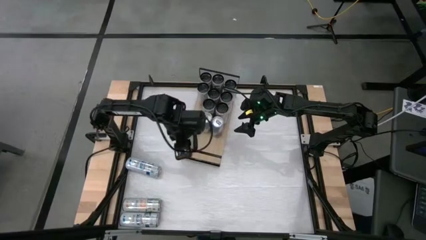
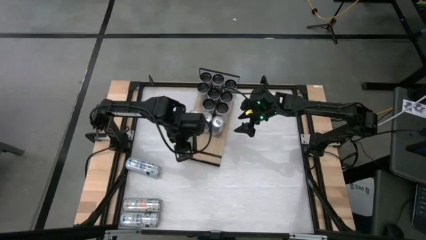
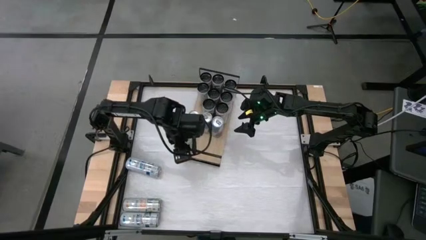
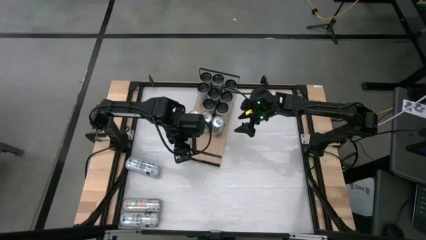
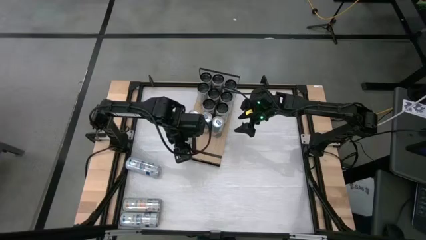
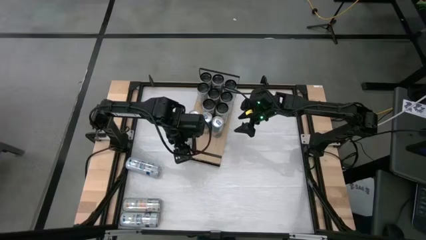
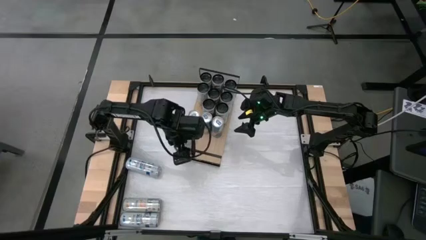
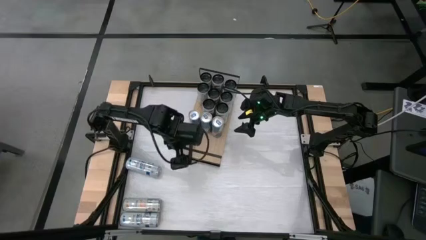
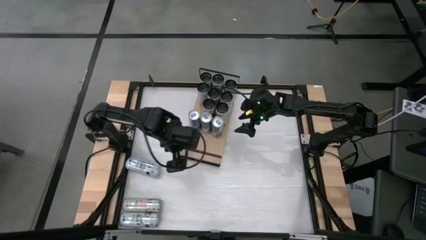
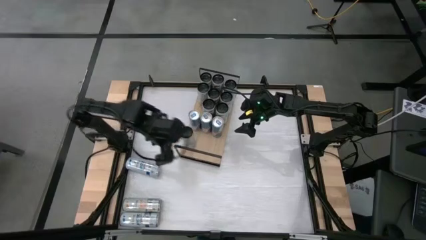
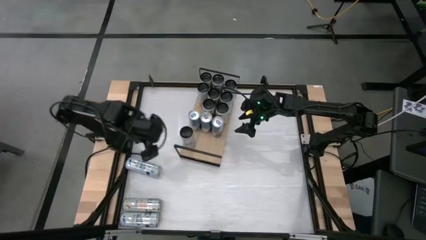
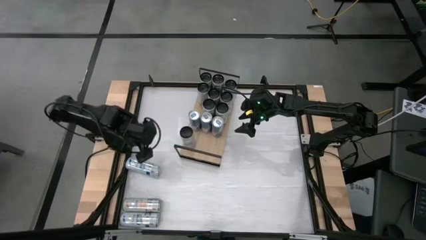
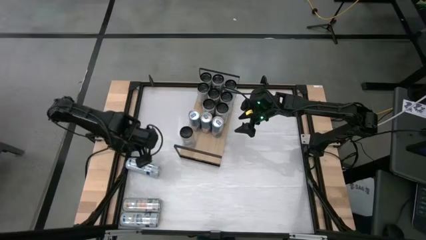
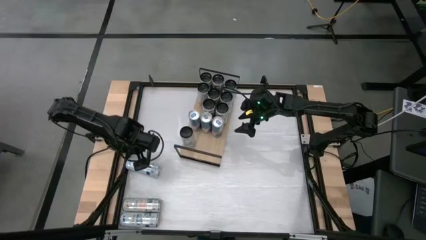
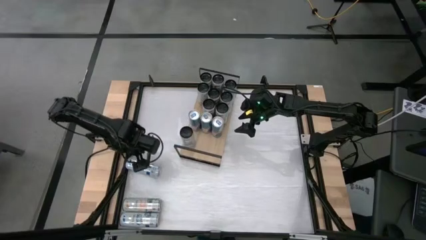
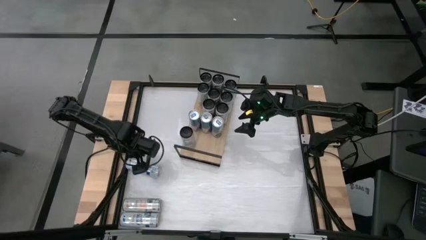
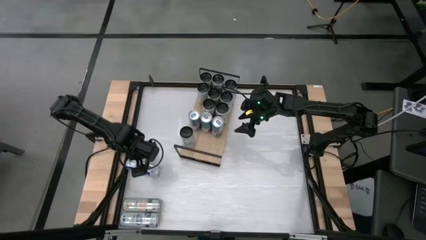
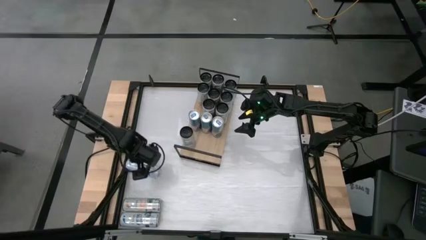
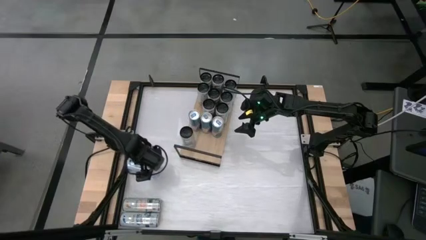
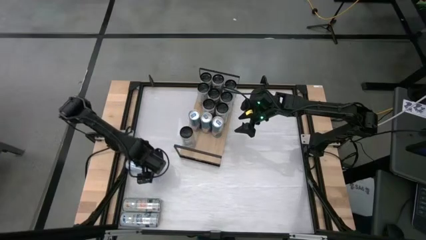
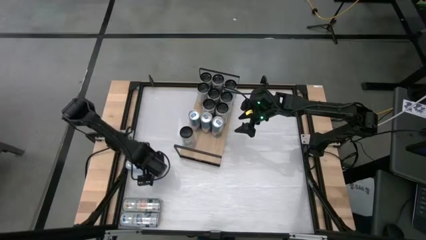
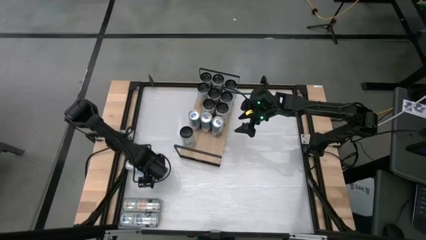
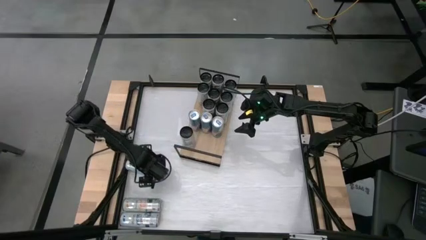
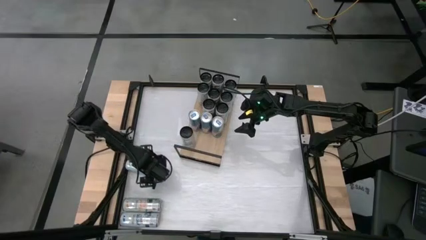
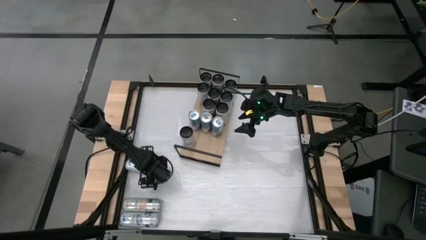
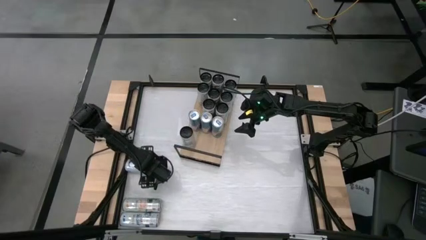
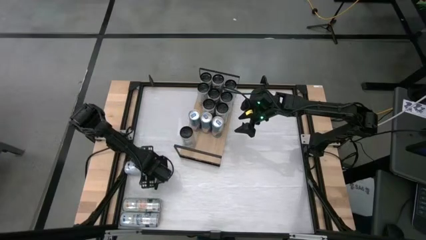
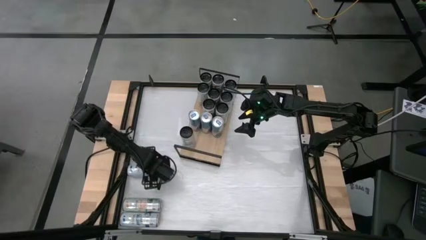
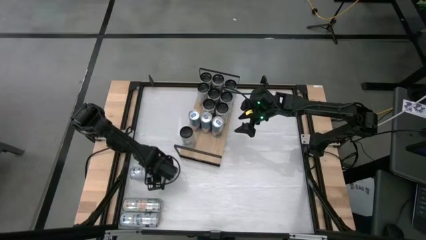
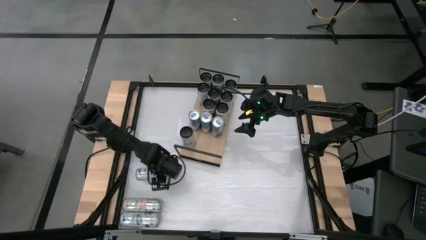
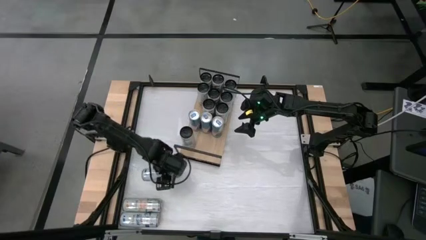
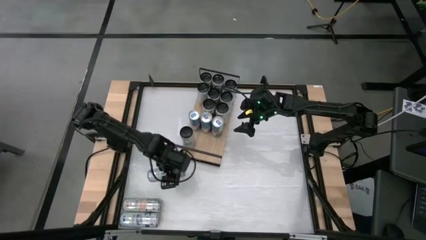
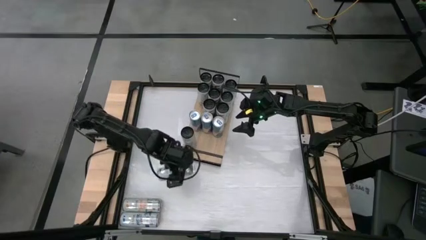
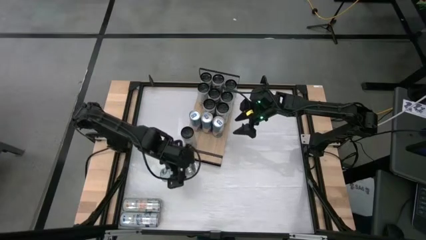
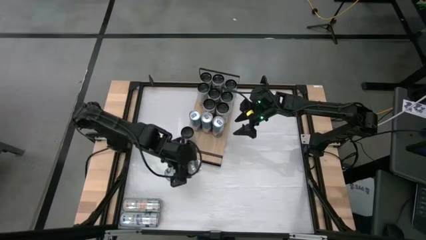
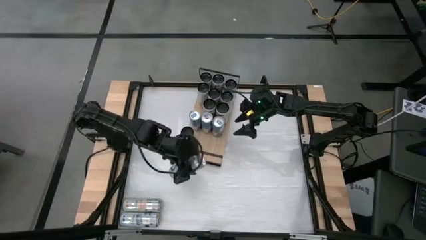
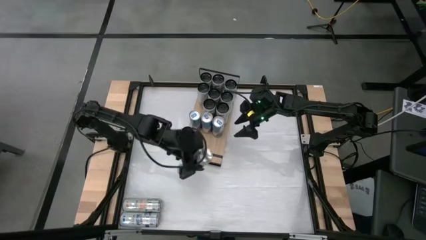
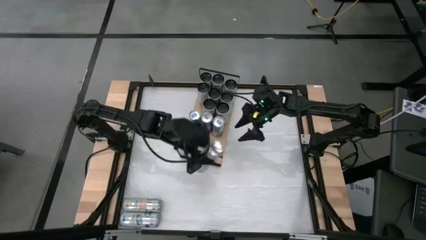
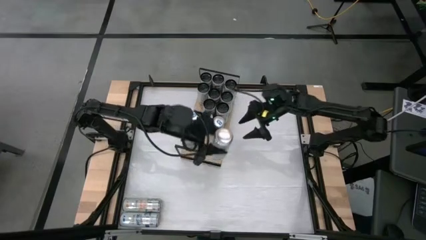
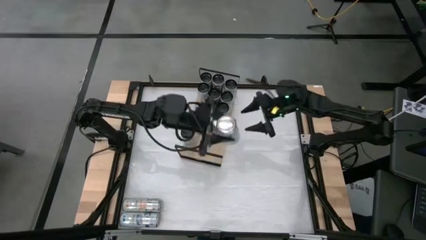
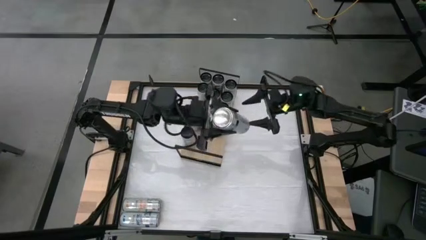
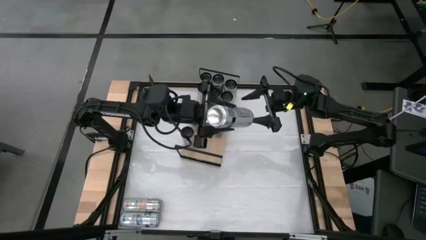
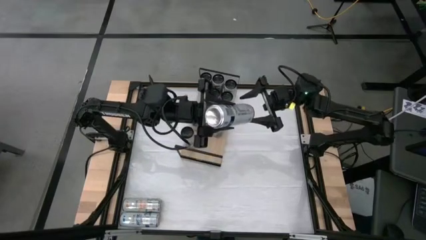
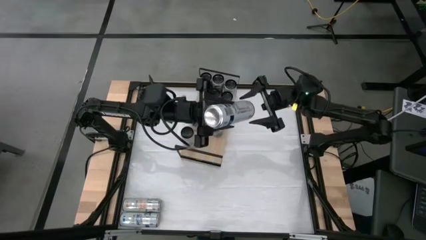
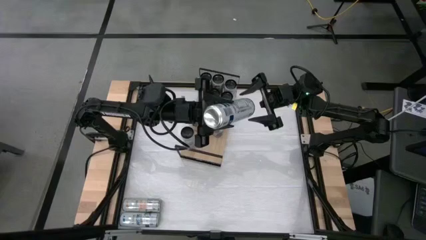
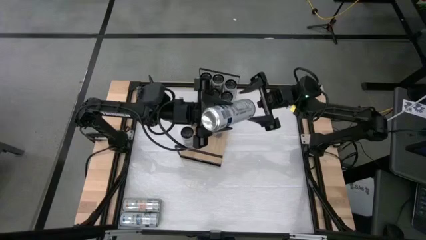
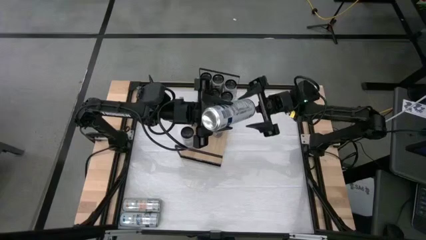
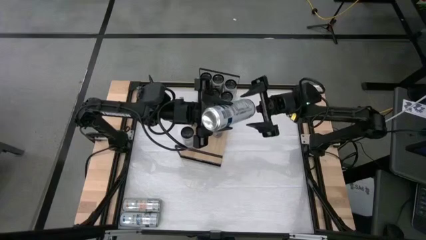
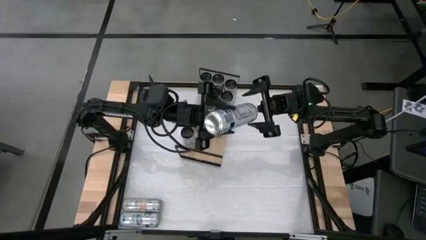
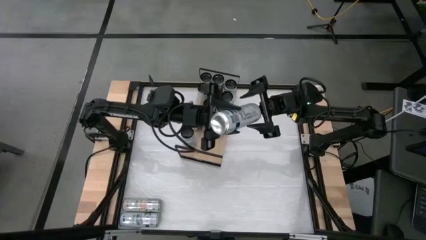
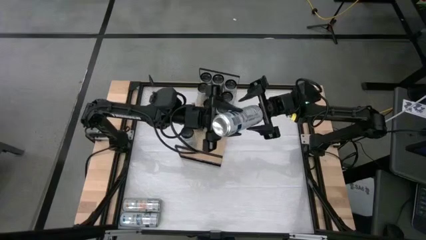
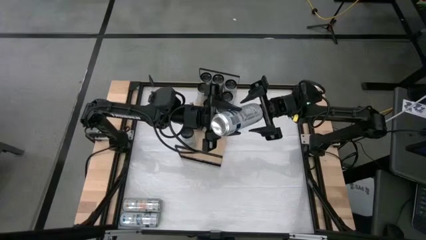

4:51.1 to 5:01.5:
Task: Place canned beverage on shelf
Move the middle left blue soda can to the top right of the shelf

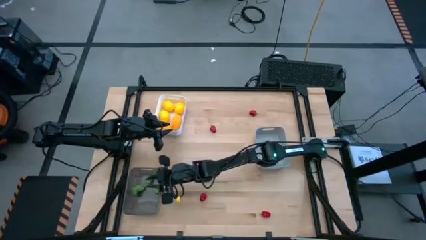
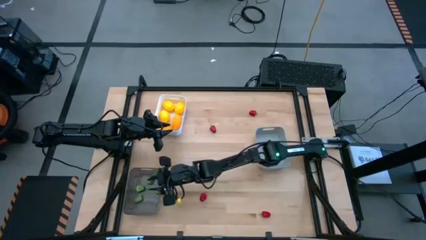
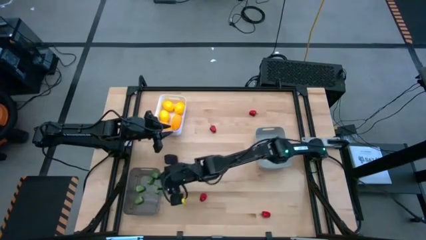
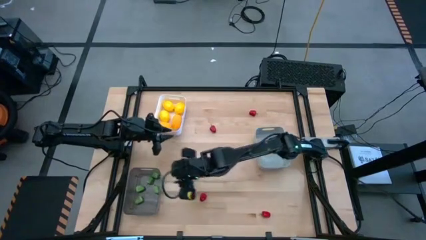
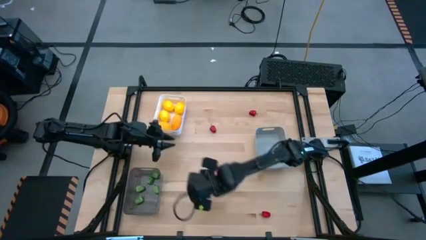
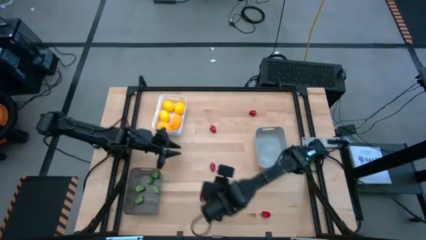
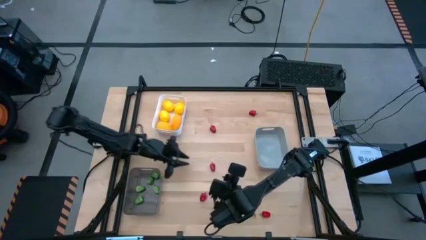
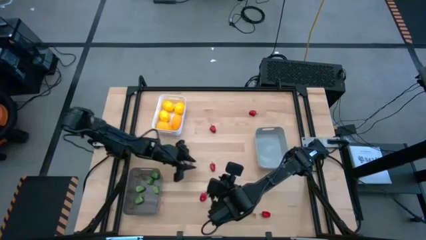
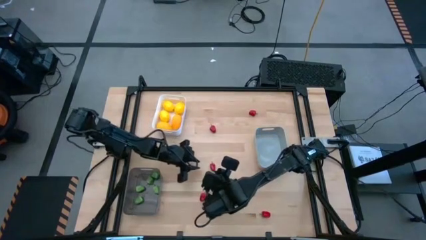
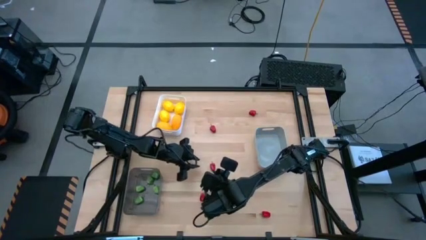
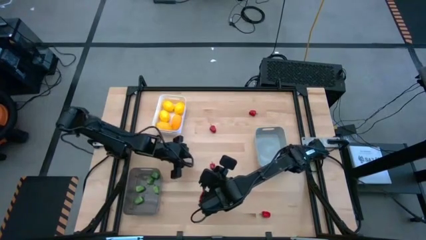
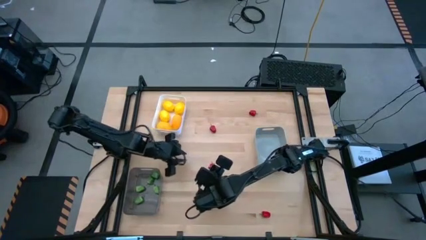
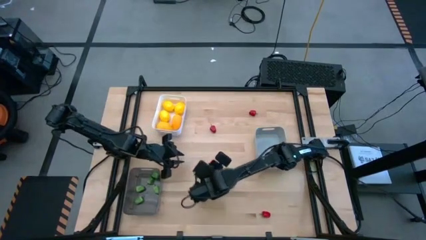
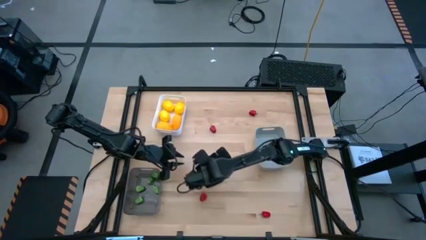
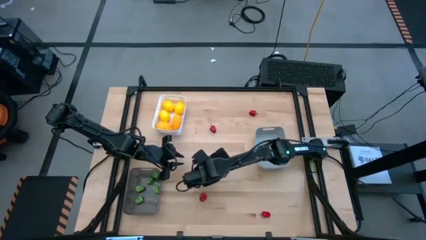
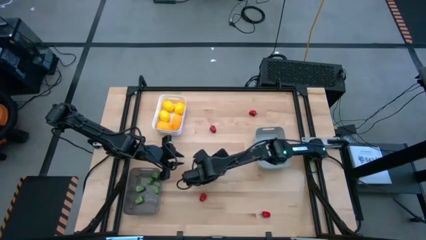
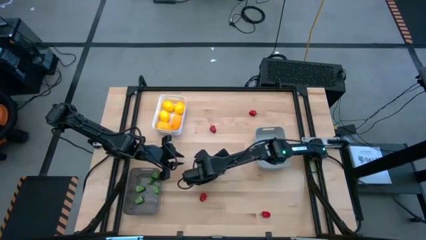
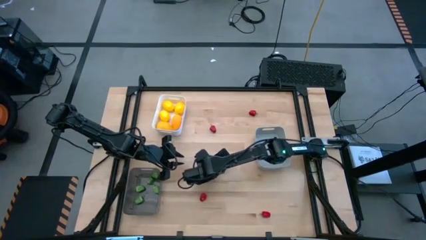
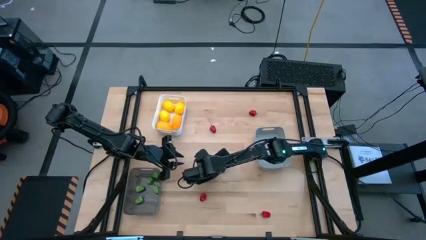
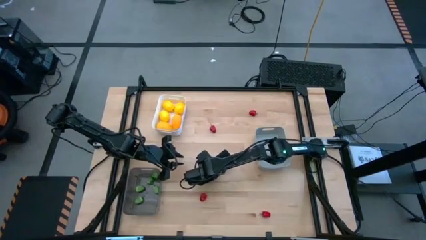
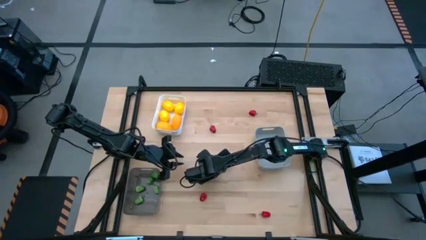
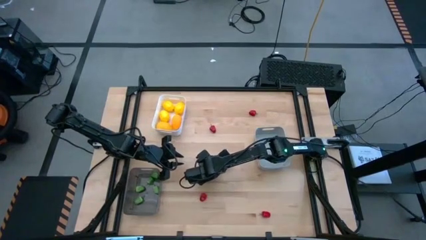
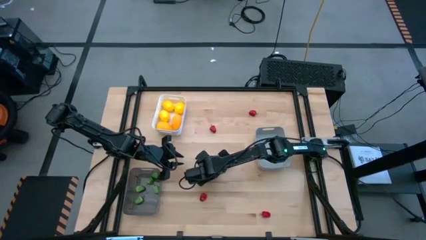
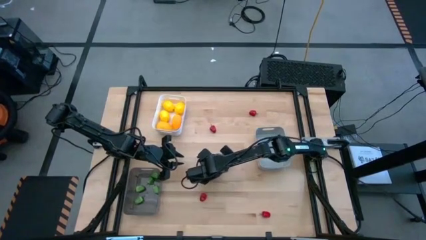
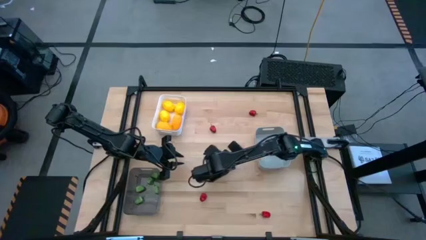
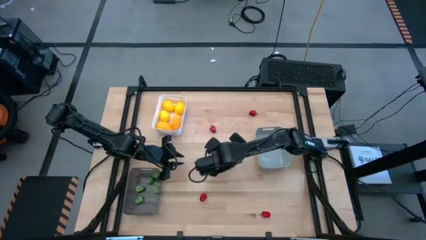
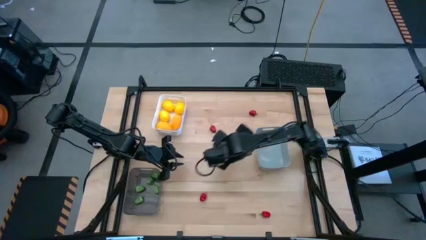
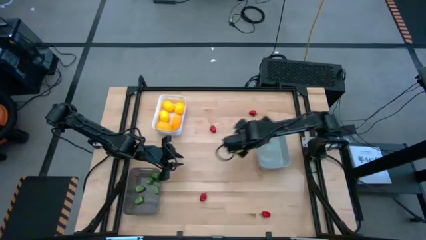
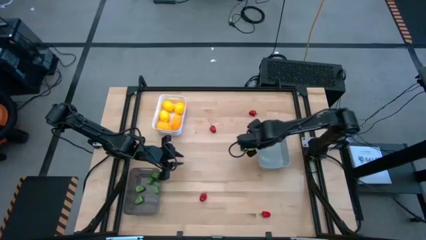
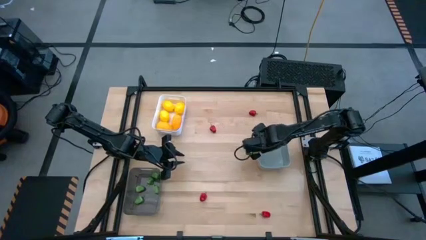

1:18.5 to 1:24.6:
Task: Sort produce into baskets
Put the middle left red chili pepper into the gray bin
